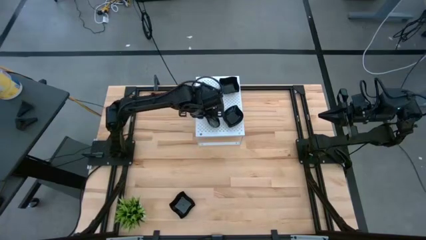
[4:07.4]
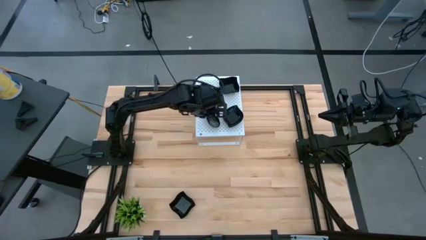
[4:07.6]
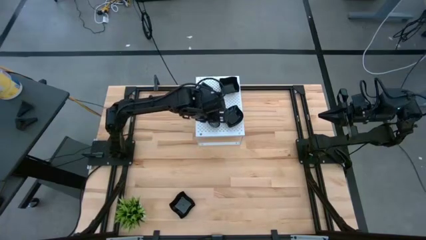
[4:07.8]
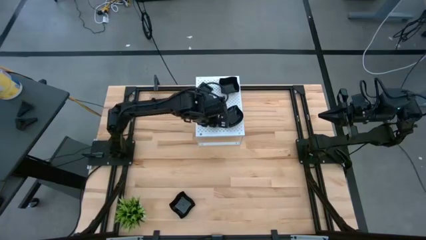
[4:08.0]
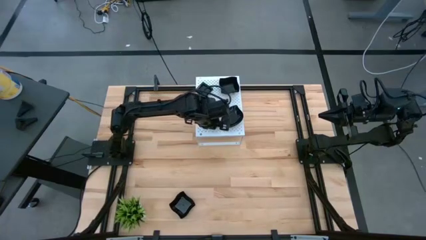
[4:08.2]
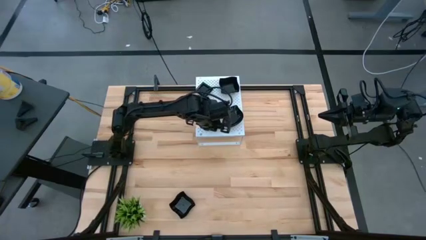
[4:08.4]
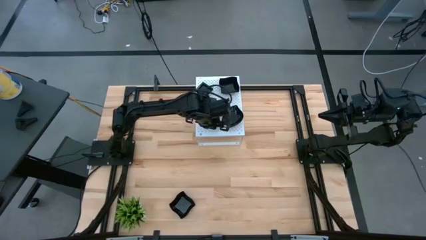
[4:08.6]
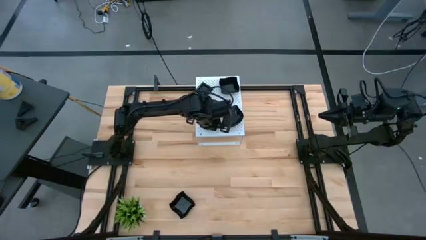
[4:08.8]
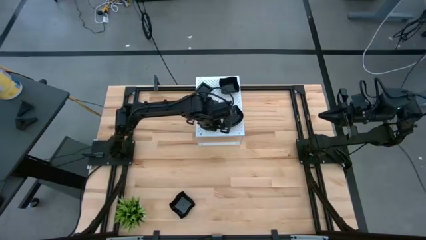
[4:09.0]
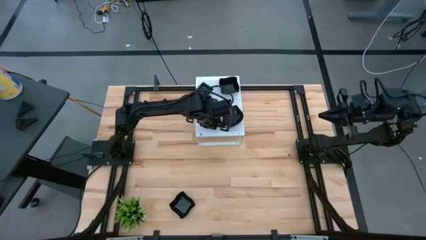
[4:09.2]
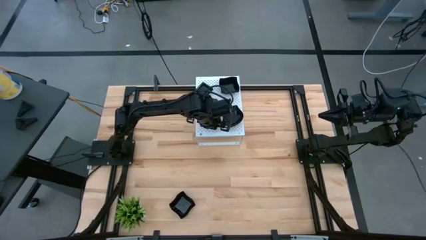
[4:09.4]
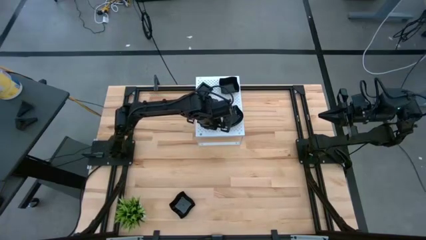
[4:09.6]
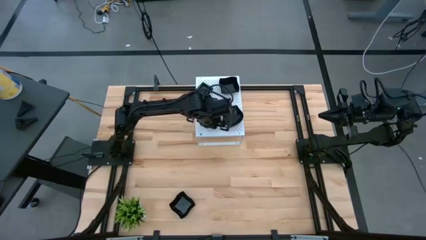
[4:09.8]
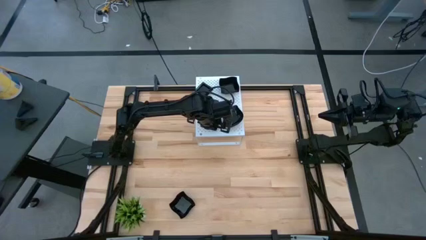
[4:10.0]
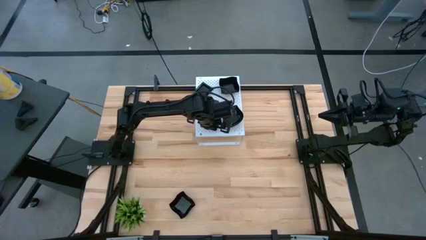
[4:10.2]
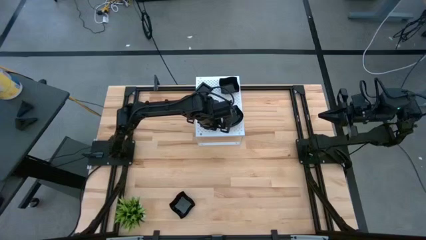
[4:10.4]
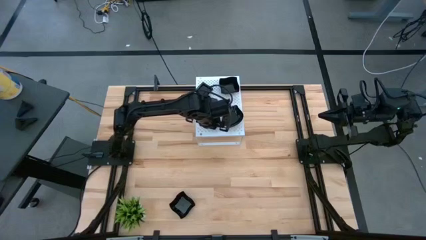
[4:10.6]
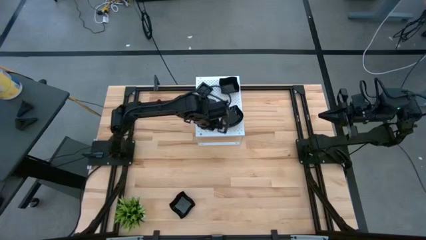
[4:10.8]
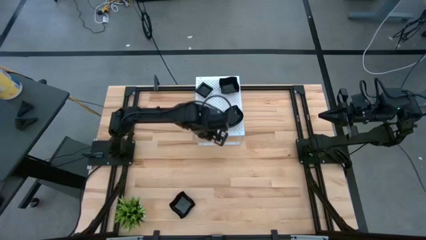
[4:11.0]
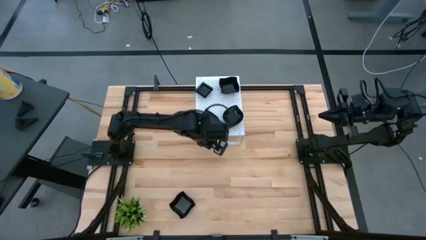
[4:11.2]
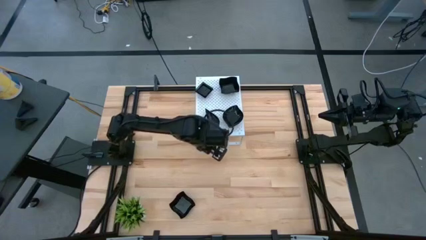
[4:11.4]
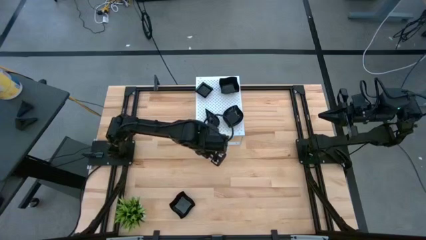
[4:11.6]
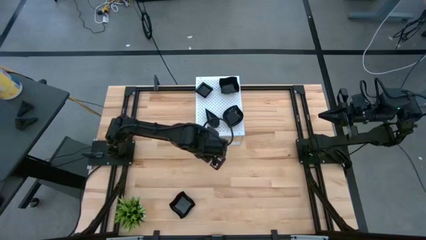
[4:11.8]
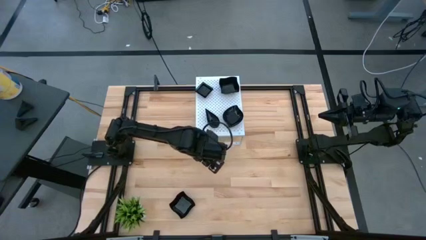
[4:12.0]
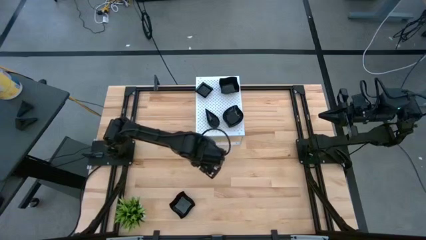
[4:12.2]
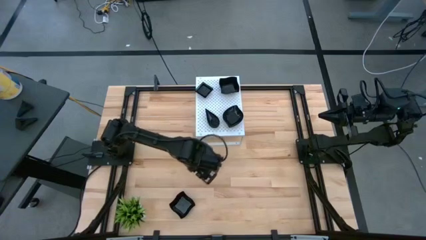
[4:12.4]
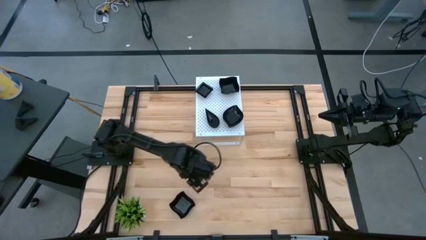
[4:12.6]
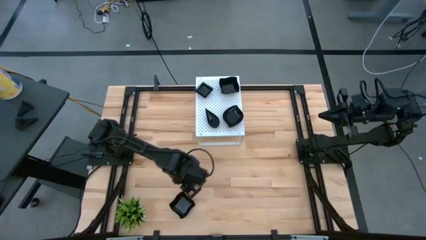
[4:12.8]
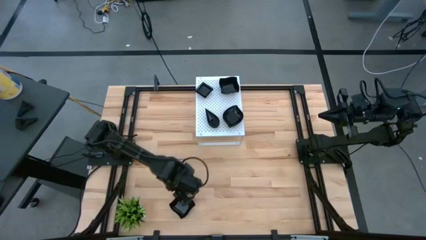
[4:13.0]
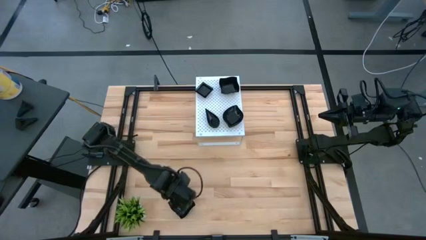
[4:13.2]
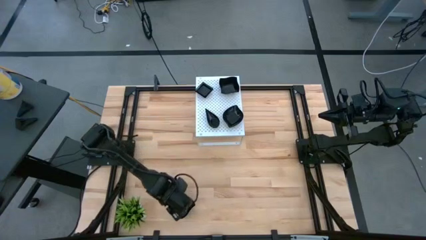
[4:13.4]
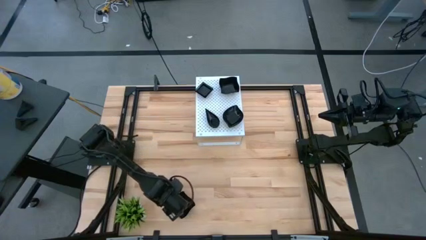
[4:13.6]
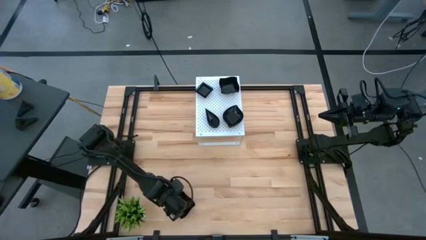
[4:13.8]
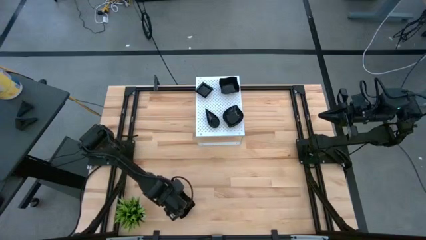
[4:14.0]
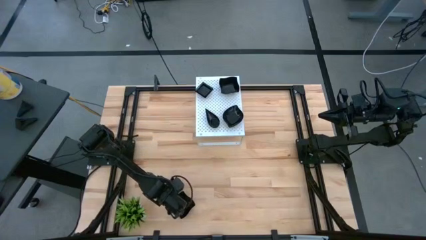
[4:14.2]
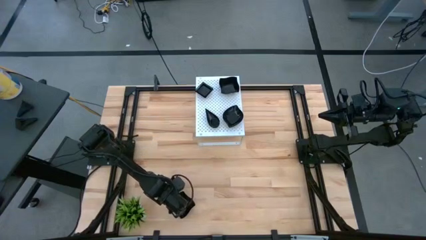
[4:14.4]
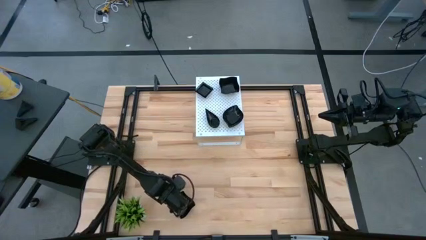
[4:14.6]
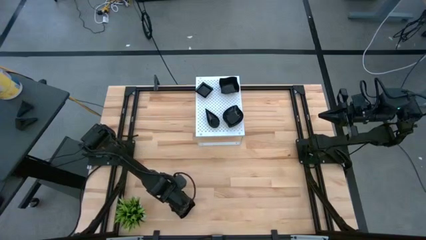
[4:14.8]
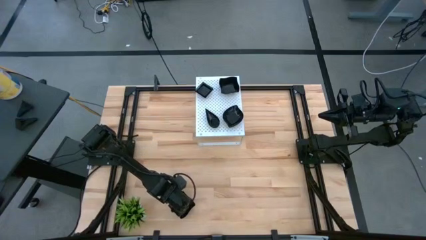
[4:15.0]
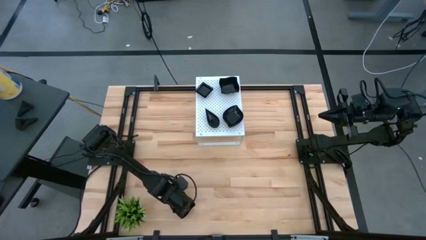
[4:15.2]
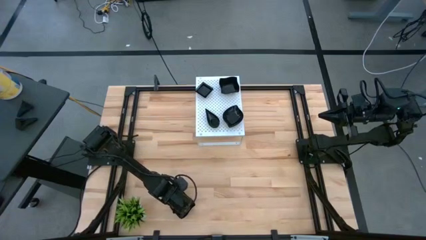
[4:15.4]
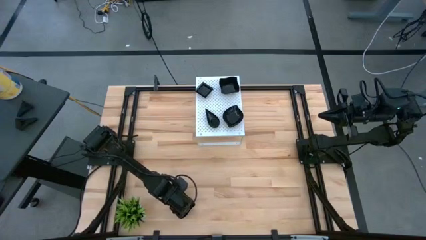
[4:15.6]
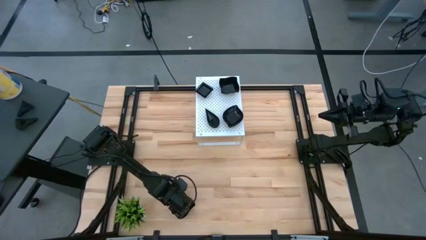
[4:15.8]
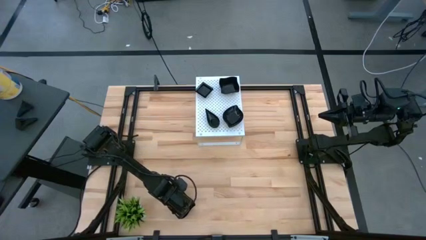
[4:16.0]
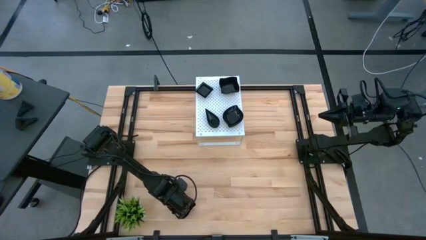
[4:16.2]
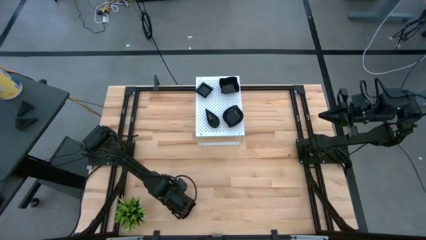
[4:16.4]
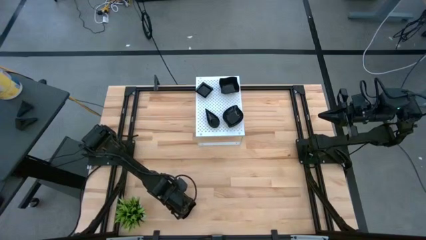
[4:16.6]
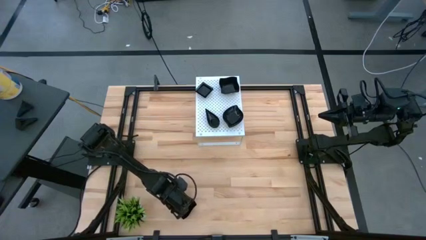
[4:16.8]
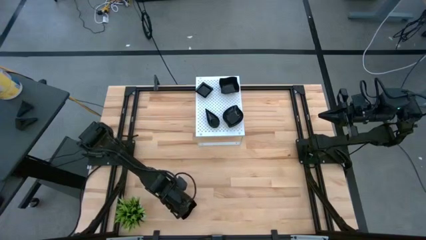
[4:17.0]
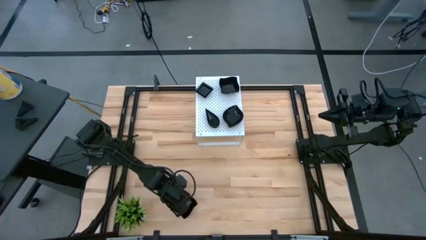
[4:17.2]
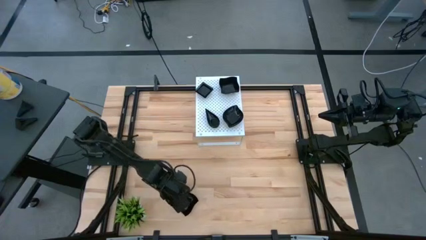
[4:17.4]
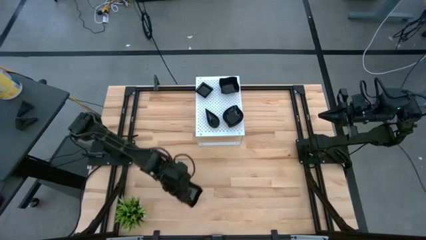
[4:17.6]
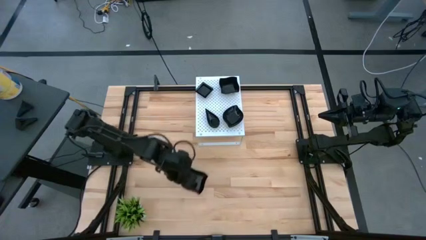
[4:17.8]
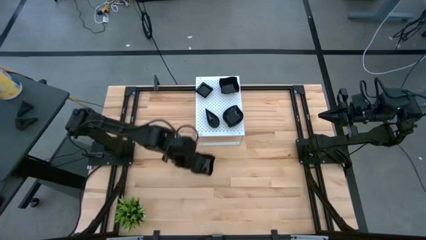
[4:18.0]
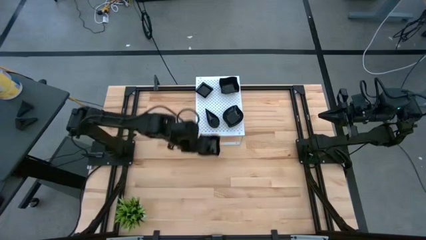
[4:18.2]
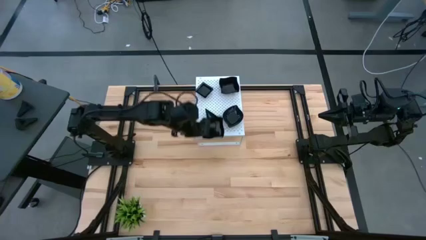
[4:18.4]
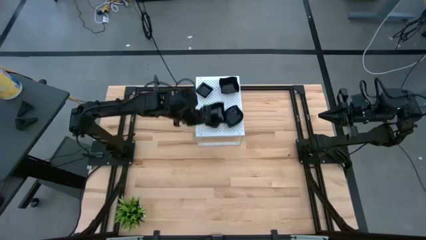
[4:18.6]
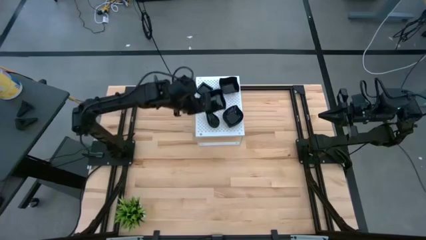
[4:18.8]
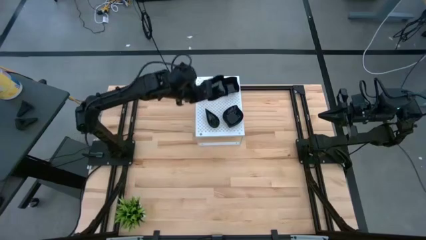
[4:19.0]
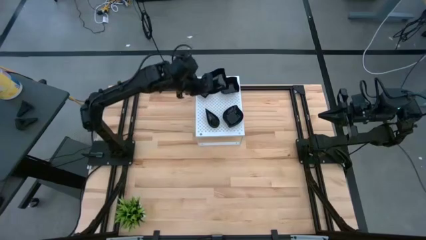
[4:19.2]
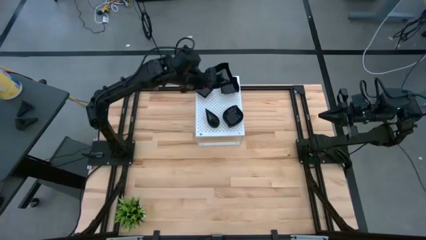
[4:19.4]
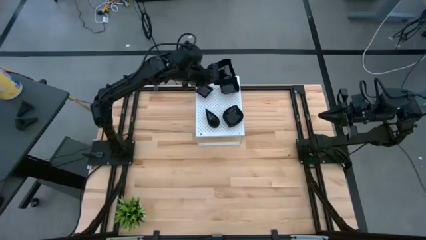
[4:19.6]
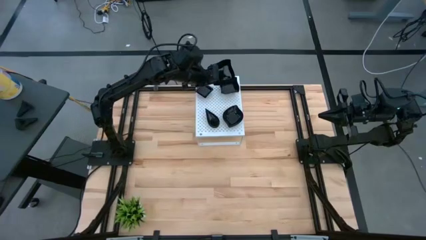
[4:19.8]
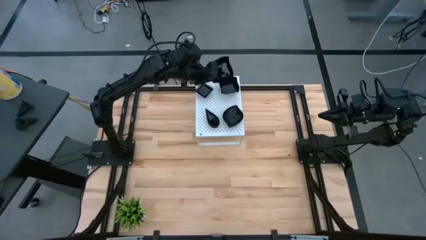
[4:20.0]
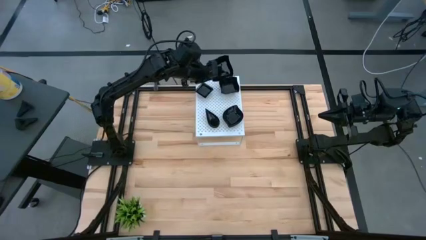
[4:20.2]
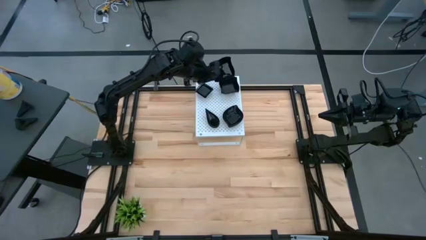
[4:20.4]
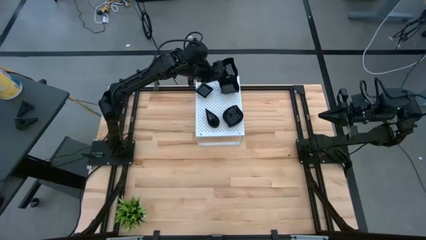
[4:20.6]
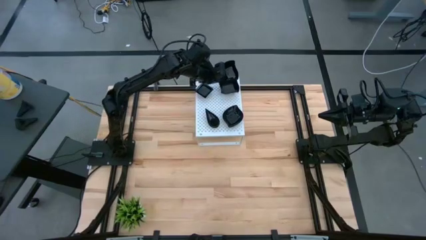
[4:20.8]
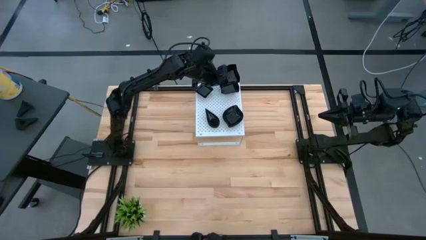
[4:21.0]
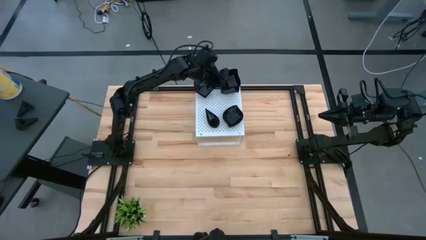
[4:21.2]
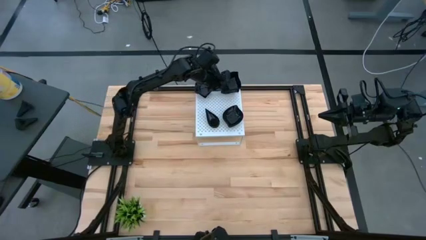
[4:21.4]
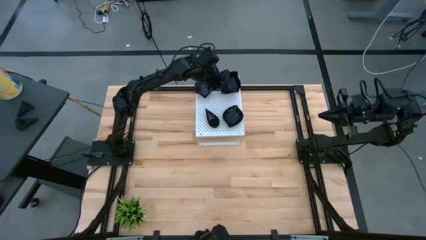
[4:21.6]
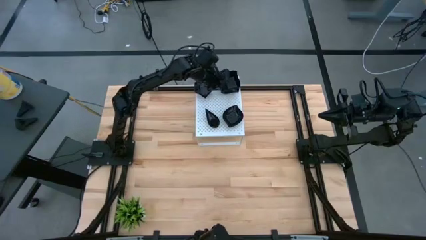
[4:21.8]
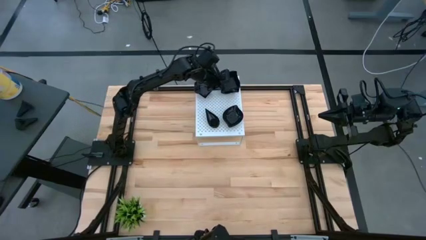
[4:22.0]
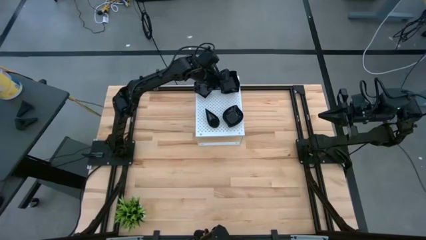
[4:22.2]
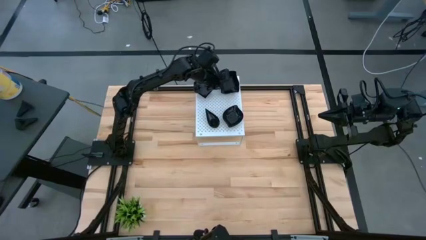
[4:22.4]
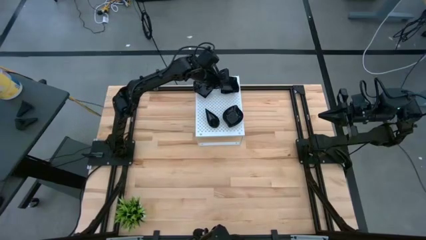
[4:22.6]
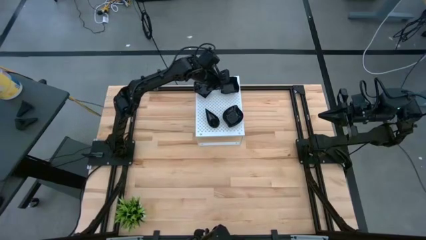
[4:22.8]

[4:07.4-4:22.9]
Task: Pick & Place Mini shaped plates
Stack the distorted square plate on top of the distorted square plate on the shelf
